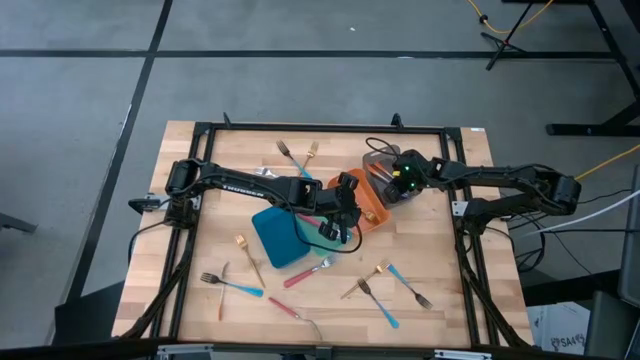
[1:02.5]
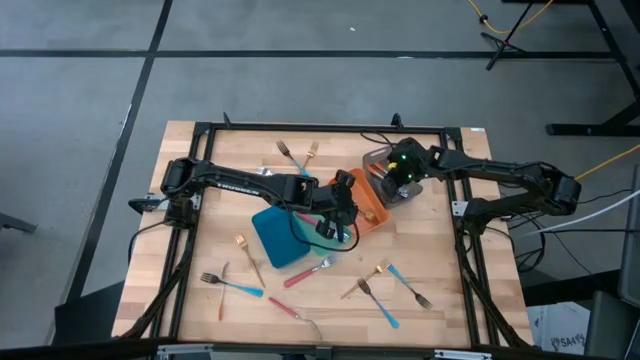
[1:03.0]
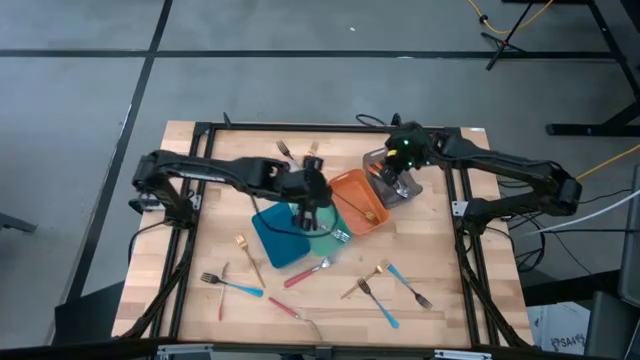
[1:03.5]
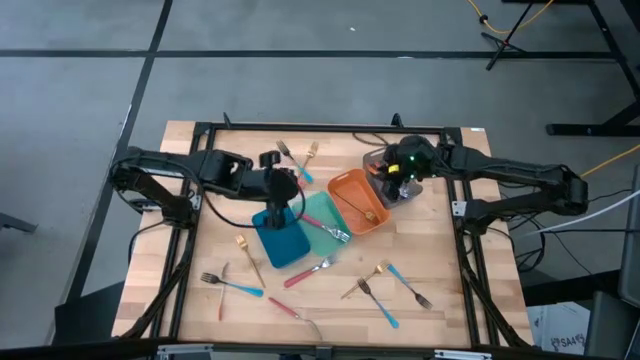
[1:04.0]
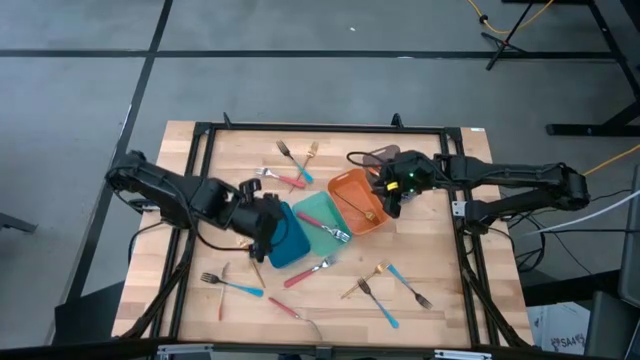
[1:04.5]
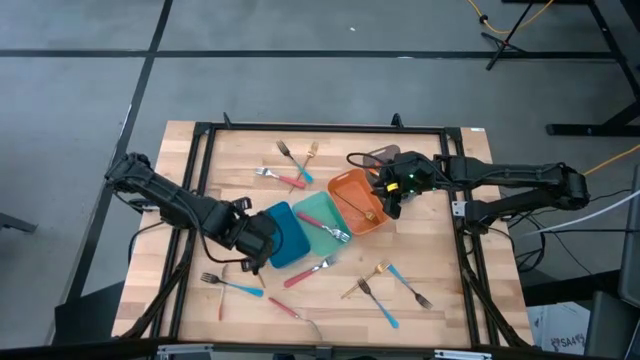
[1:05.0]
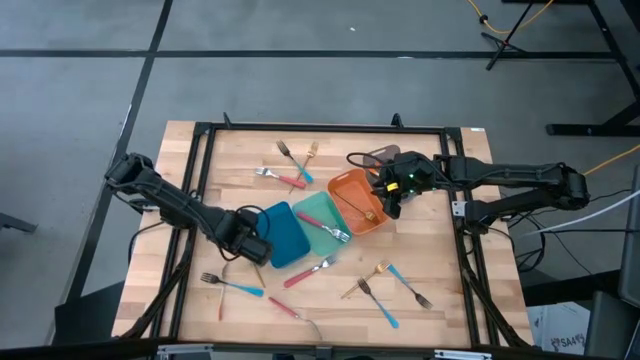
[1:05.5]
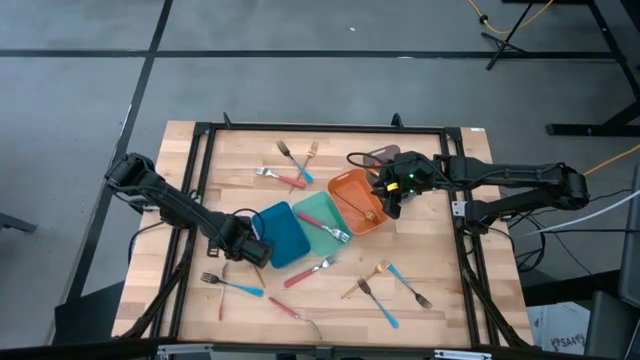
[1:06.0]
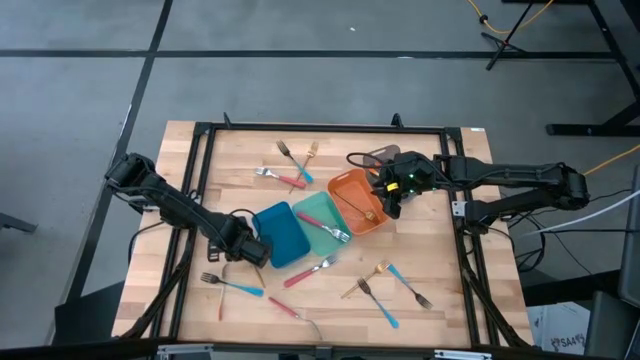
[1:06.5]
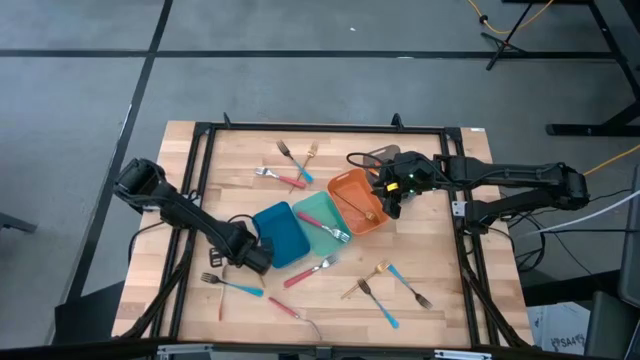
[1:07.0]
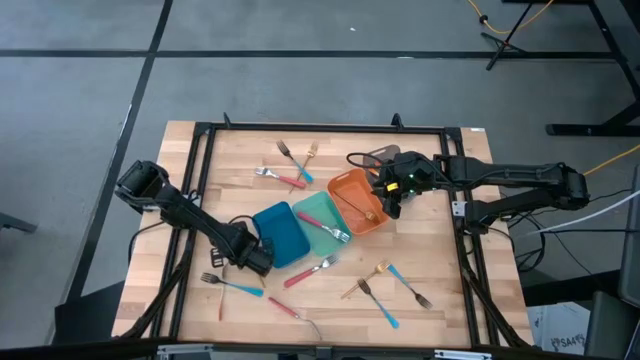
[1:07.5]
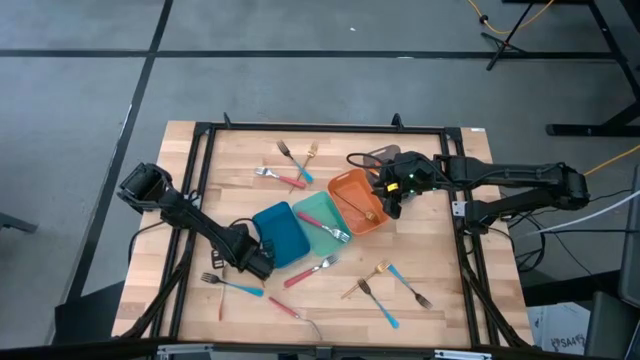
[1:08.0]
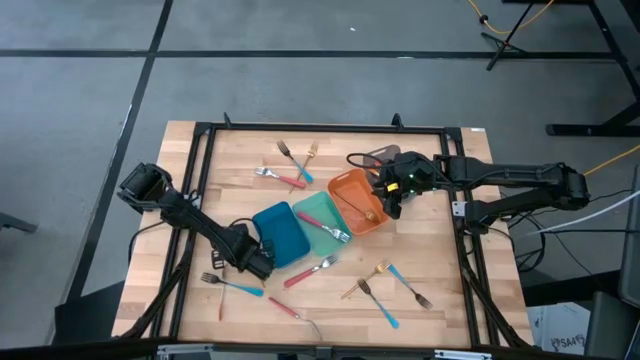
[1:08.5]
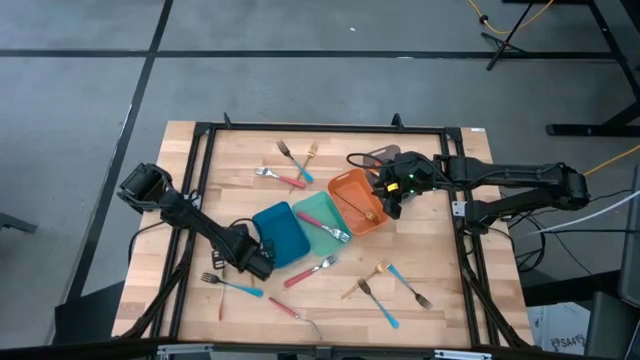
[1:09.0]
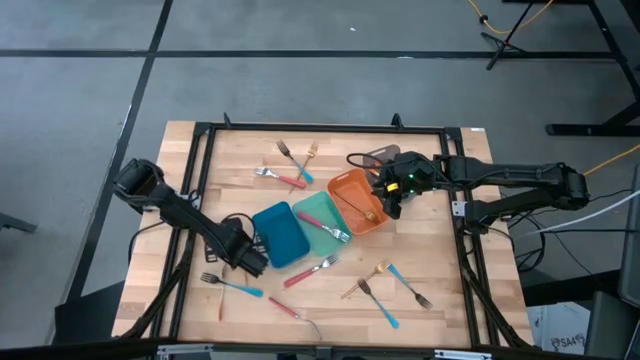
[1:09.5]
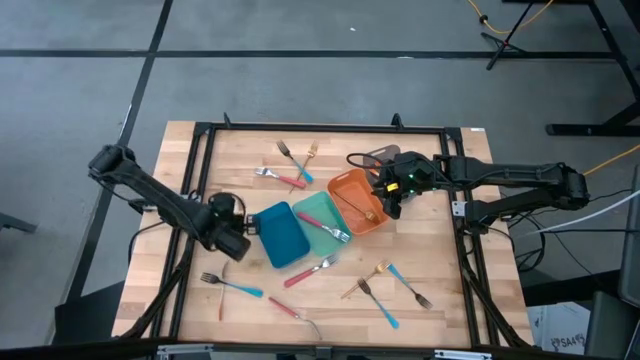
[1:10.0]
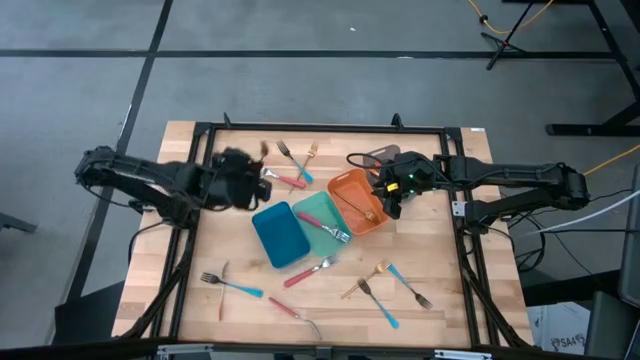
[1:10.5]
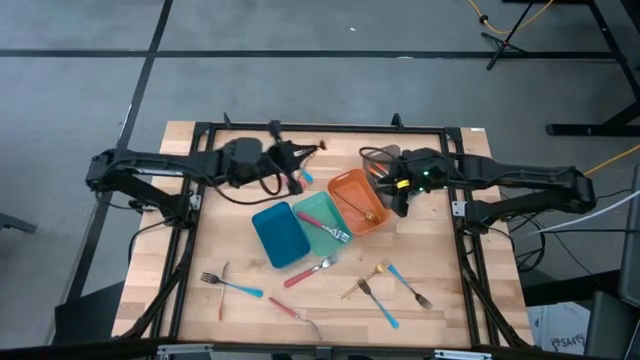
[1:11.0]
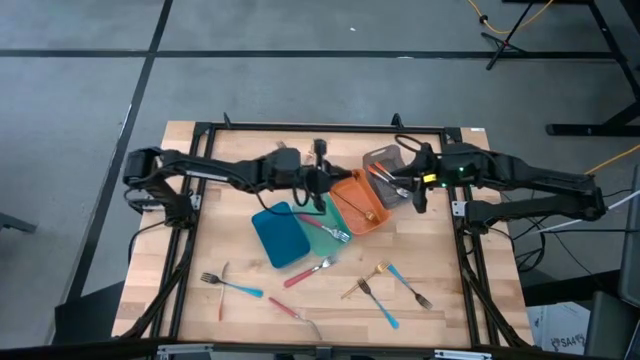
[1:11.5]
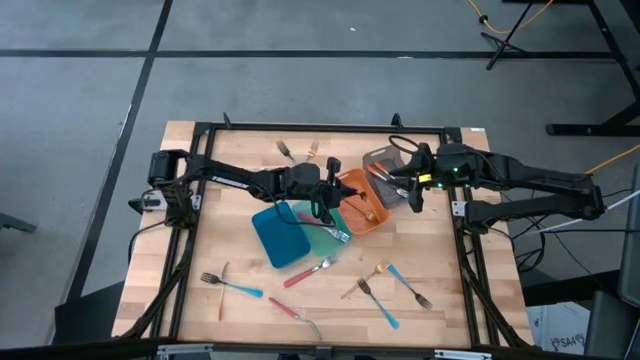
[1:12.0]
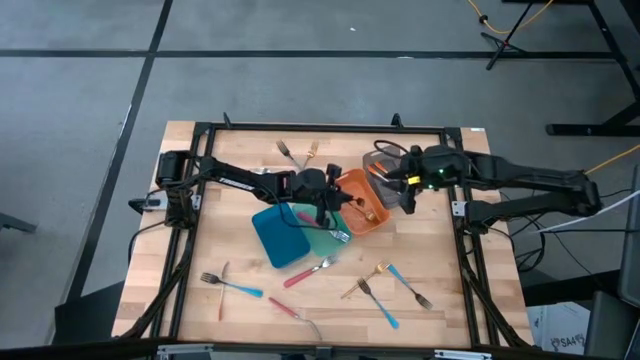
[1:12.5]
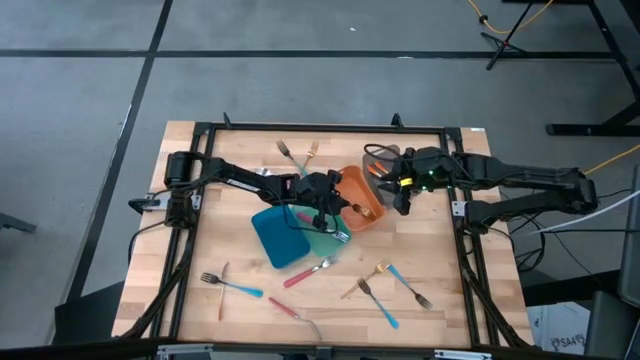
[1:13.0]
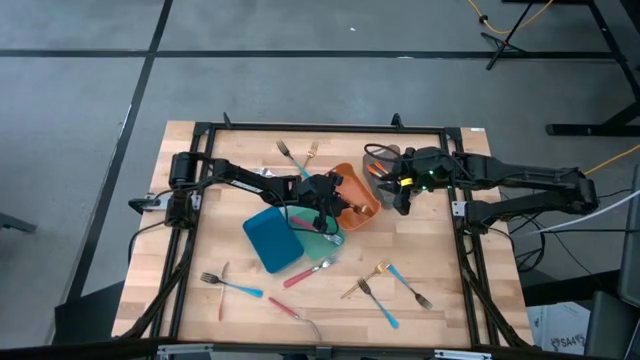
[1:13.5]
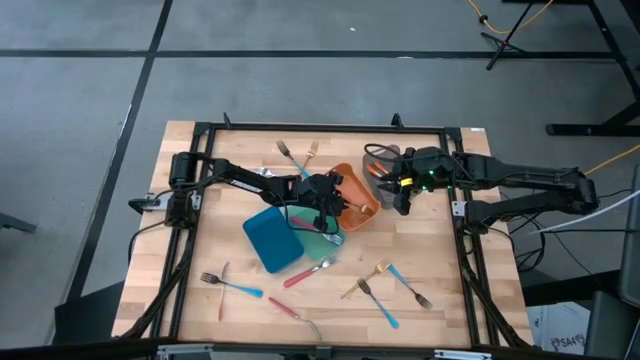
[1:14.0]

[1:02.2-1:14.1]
Task: Sort silverware by color (type)
Put the gold fork into the orange bin

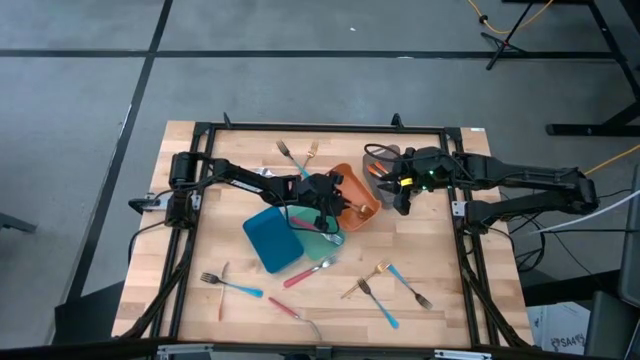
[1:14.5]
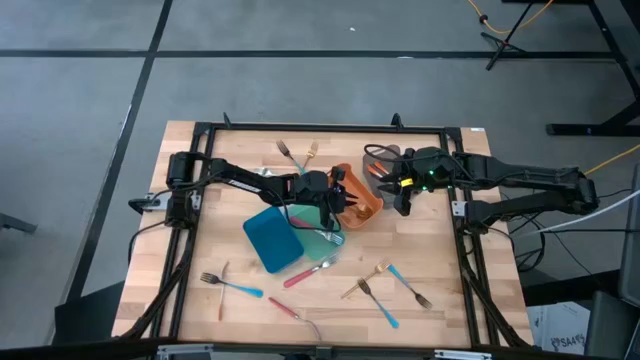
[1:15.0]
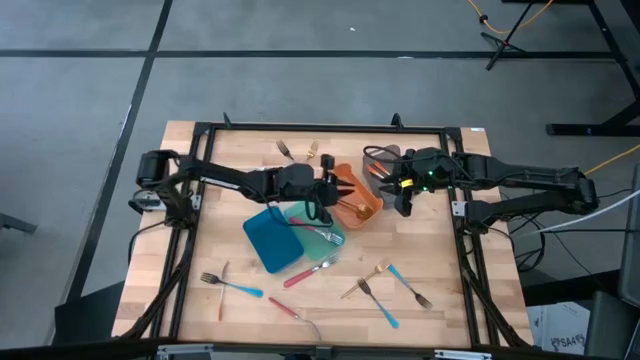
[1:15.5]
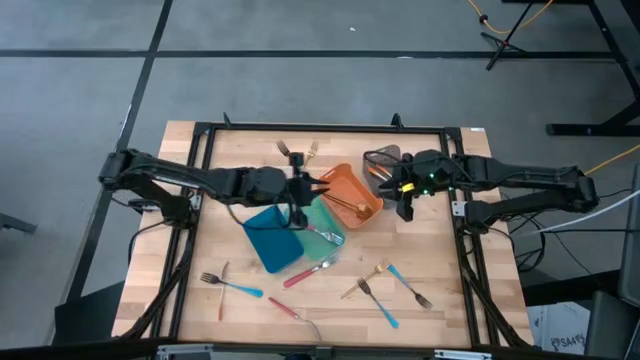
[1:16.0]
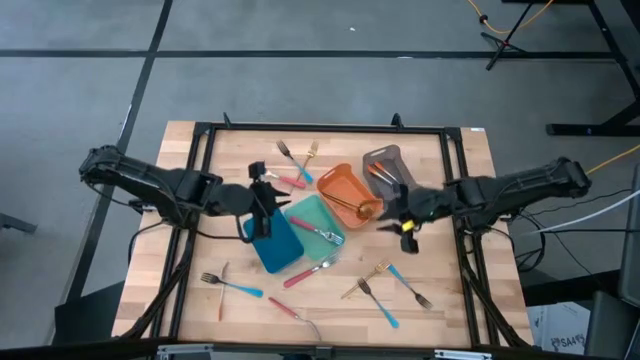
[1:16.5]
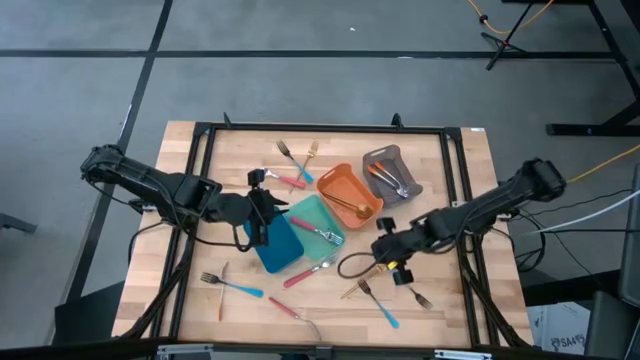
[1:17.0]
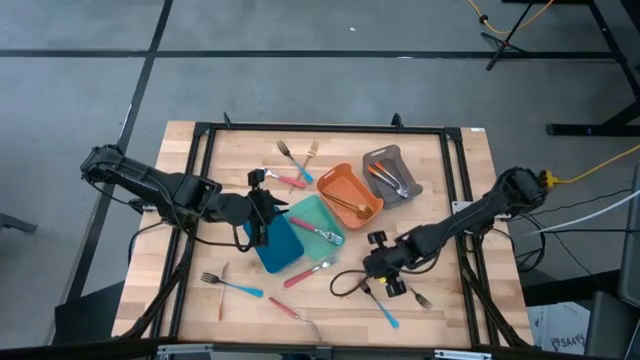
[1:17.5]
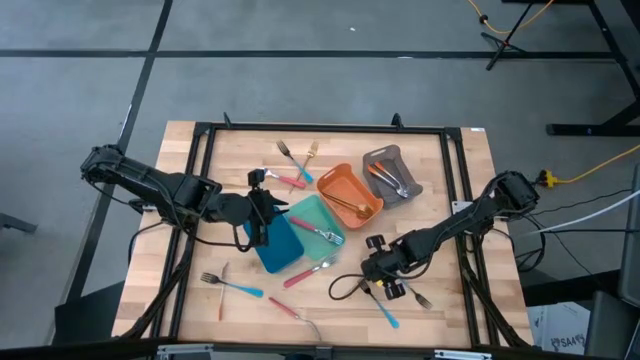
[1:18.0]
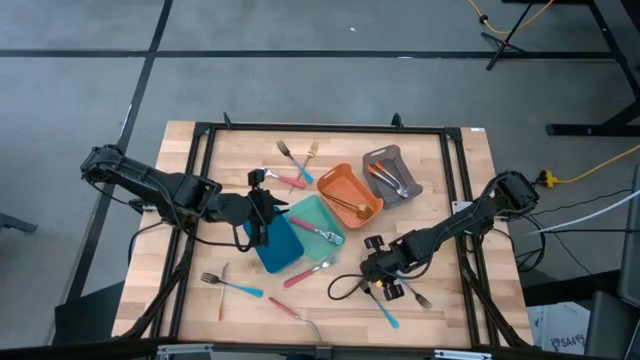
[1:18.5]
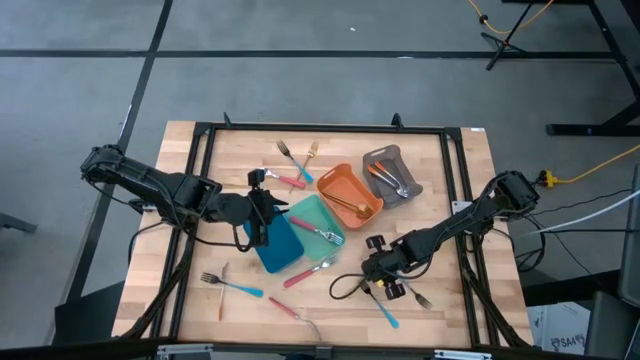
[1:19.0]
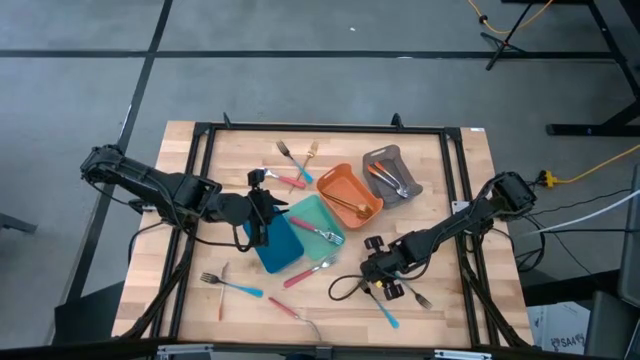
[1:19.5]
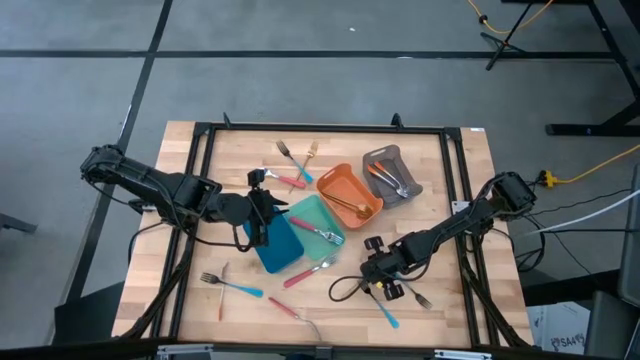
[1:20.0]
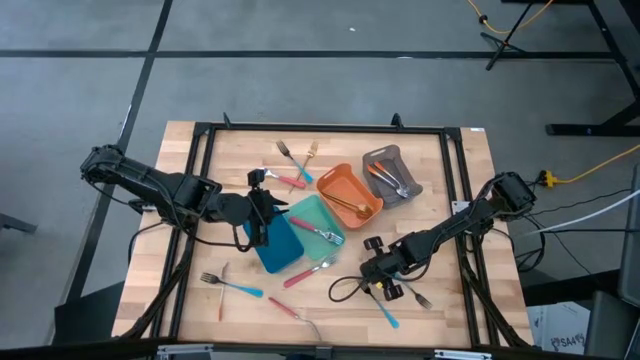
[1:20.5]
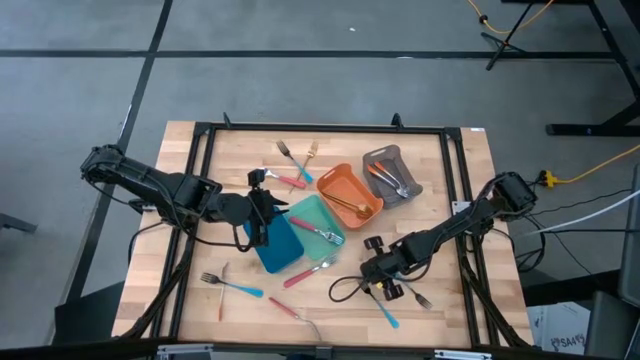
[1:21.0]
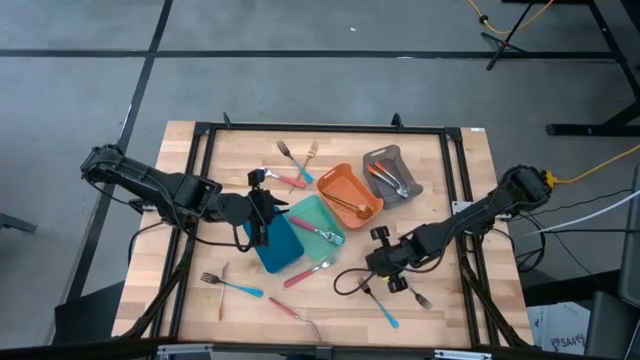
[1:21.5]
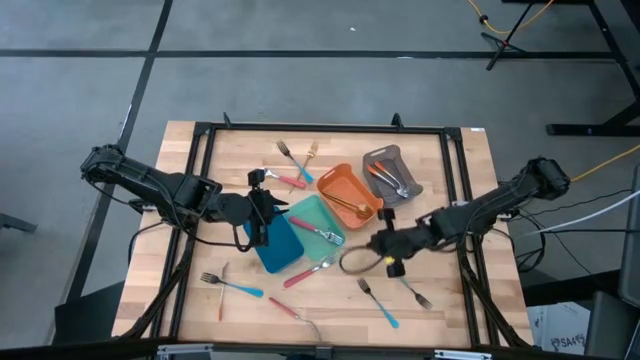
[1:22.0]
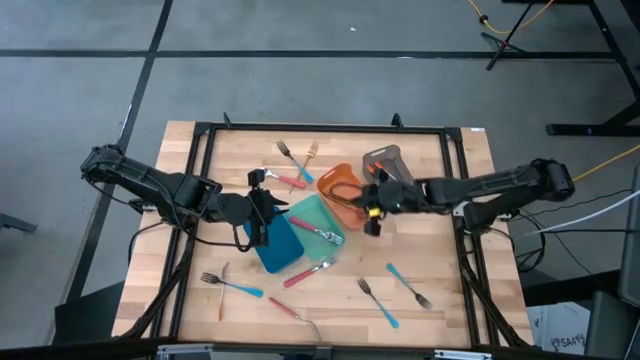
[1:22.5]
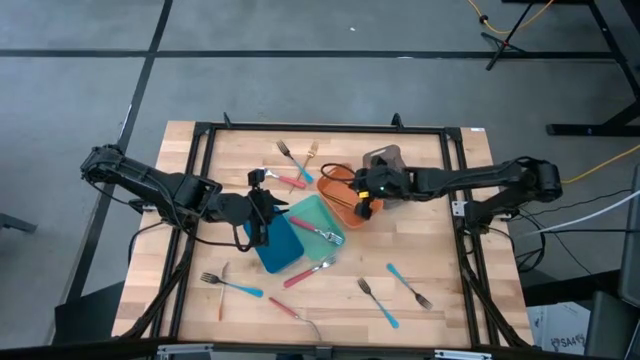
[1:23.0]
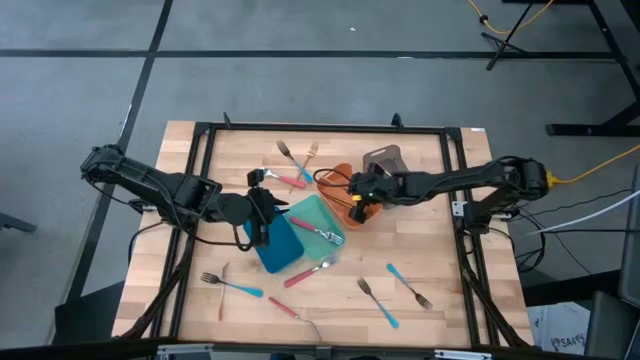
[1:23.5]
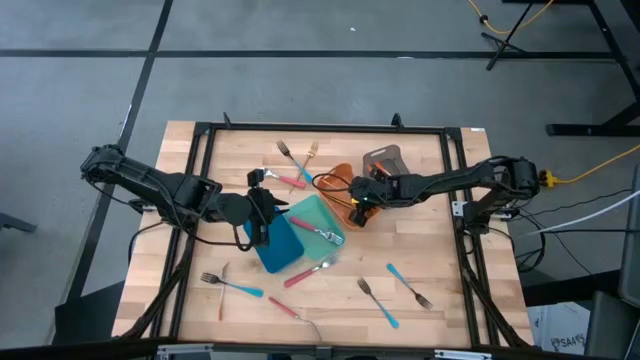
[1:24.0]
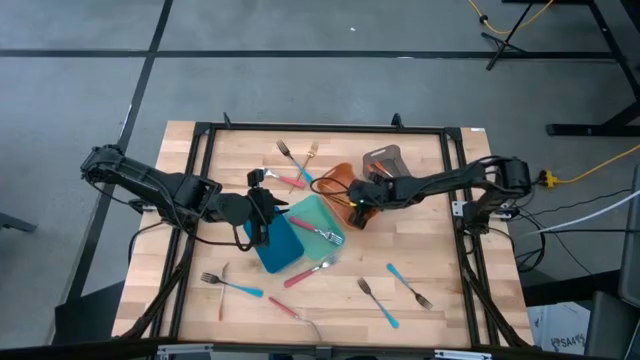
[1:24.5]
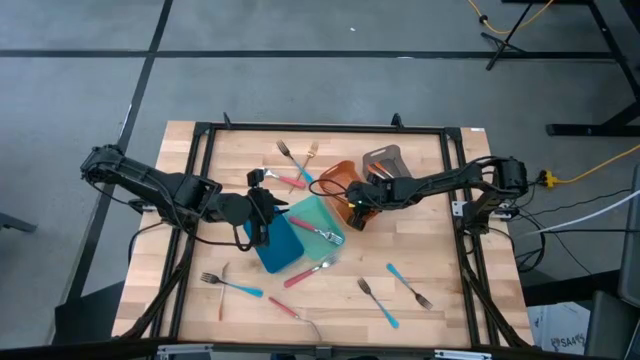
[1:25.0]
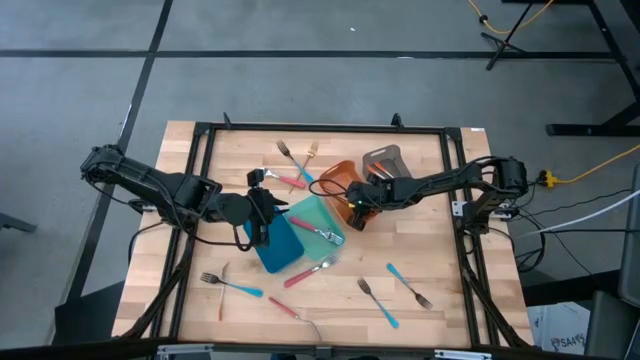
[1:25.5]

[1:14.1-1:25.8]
Put the gold fork into the orange bin
